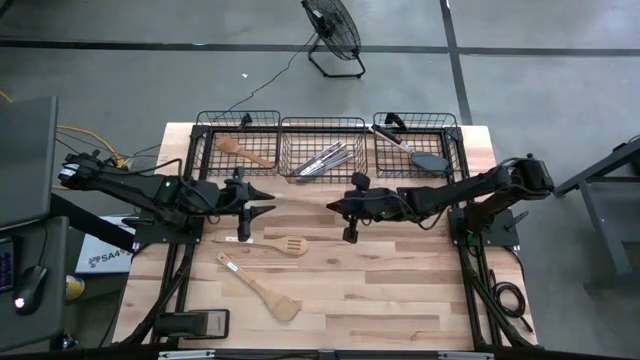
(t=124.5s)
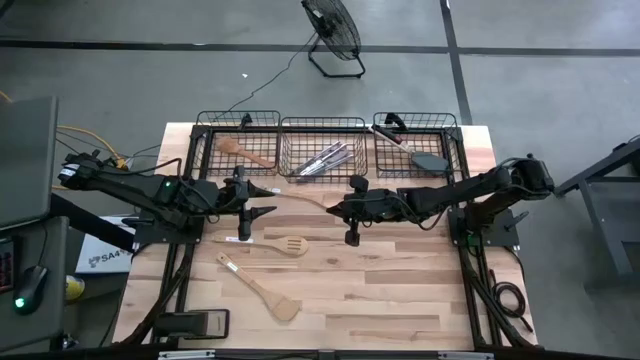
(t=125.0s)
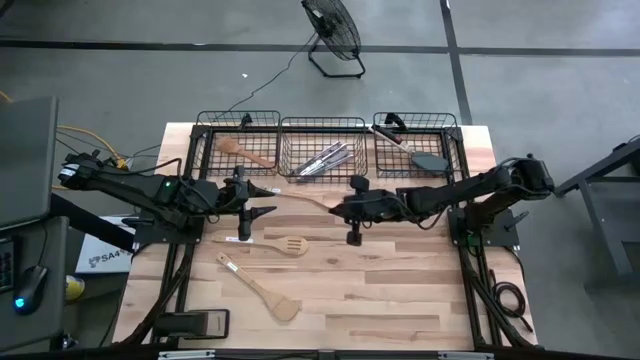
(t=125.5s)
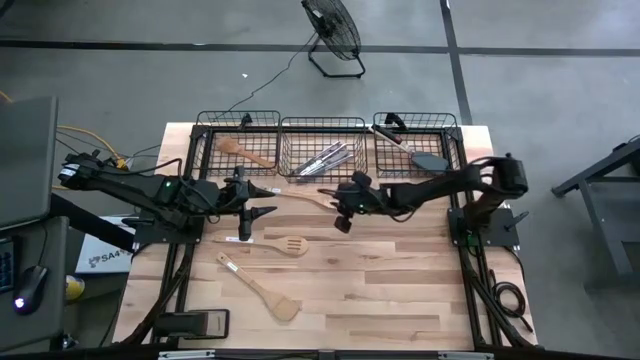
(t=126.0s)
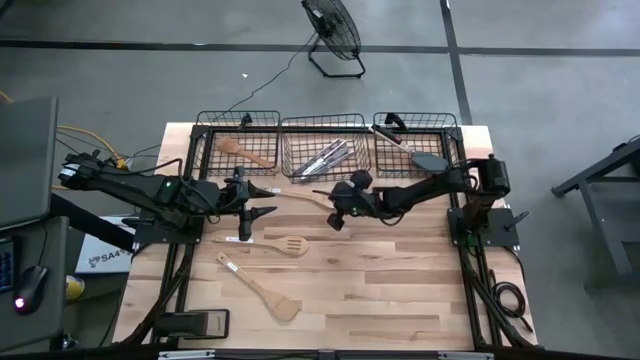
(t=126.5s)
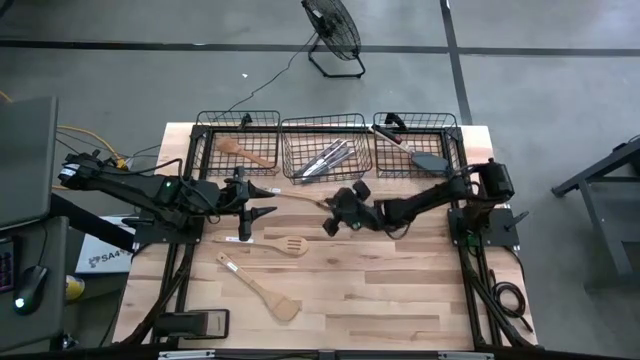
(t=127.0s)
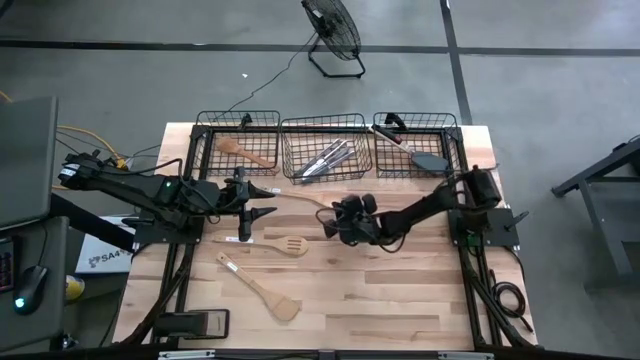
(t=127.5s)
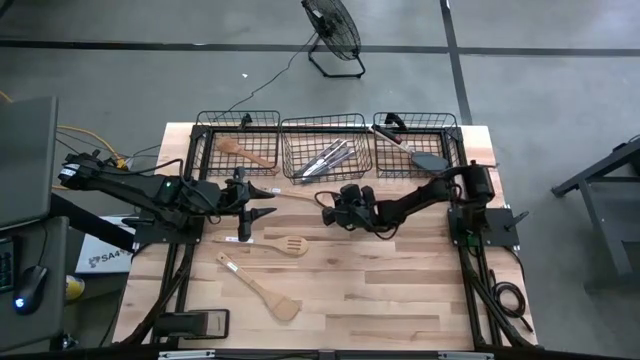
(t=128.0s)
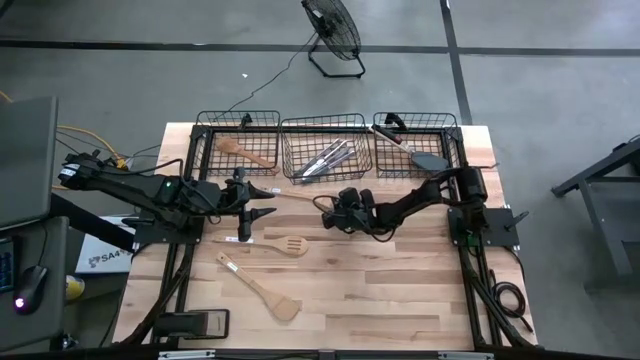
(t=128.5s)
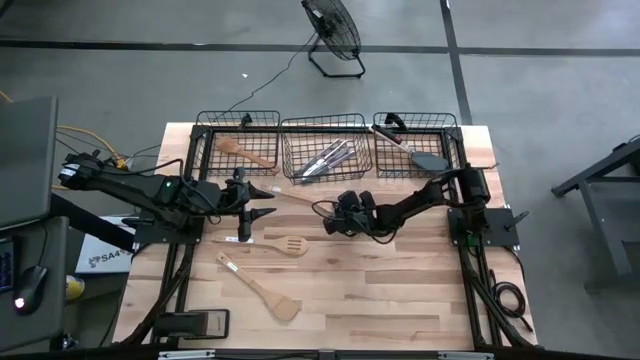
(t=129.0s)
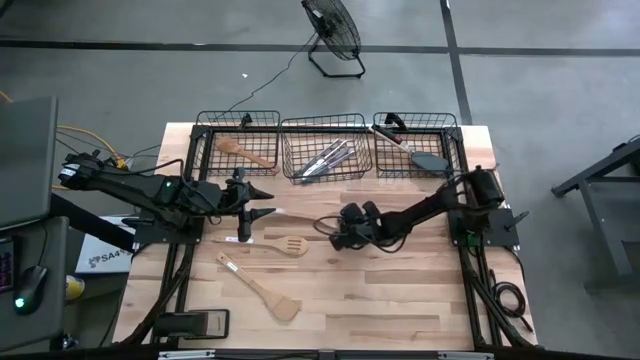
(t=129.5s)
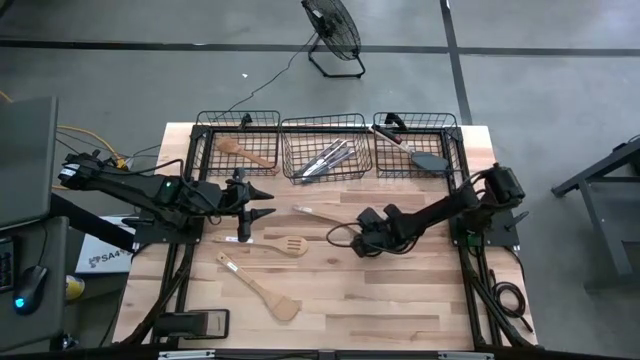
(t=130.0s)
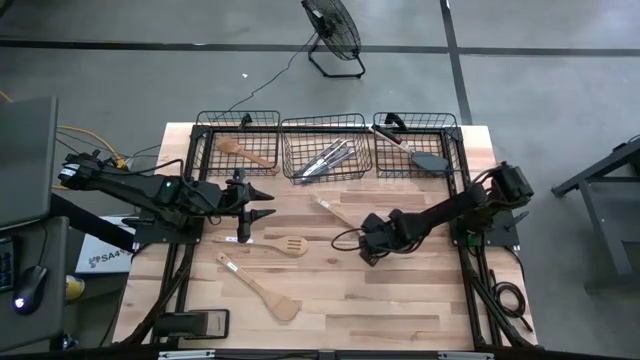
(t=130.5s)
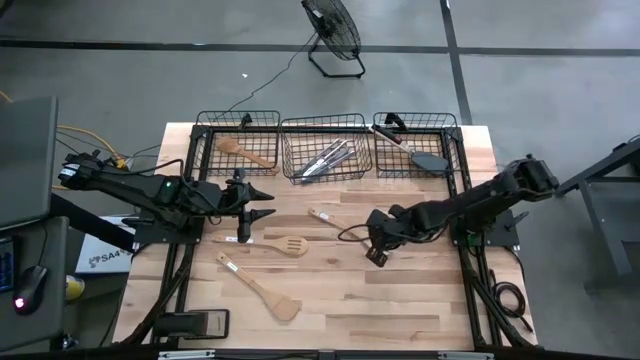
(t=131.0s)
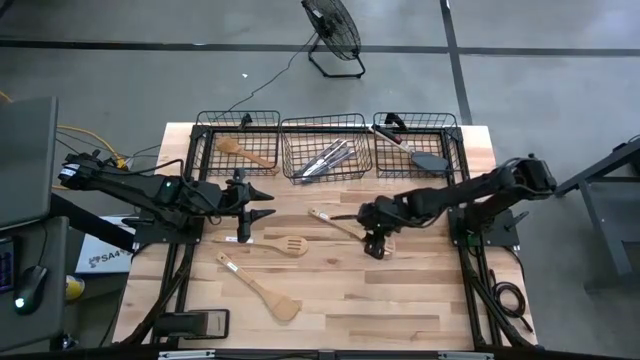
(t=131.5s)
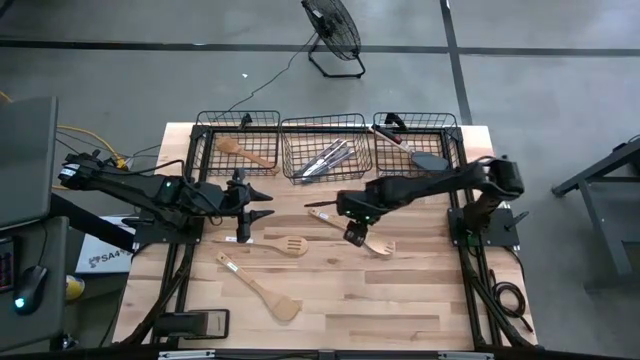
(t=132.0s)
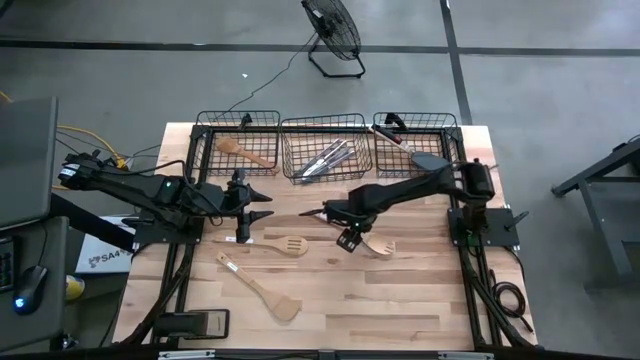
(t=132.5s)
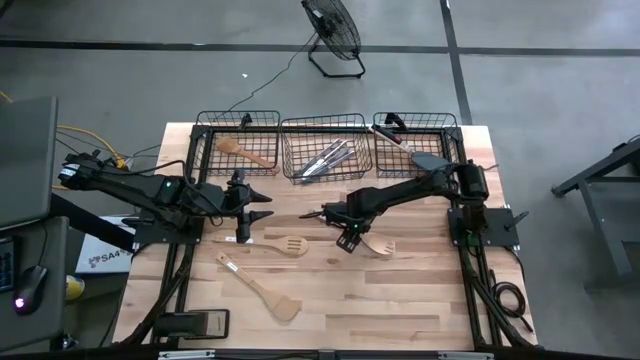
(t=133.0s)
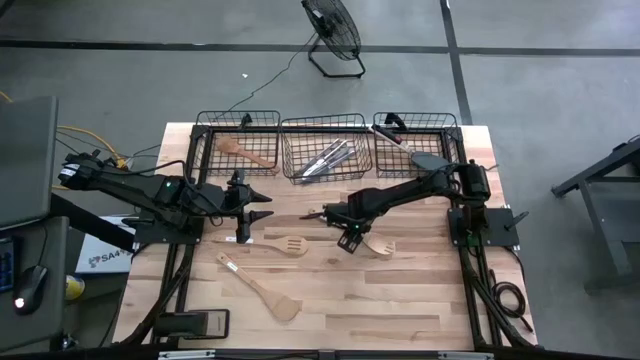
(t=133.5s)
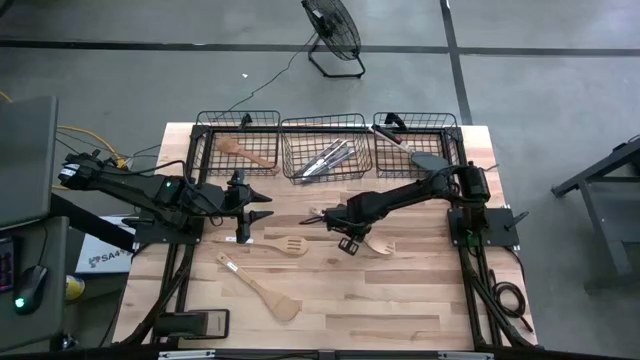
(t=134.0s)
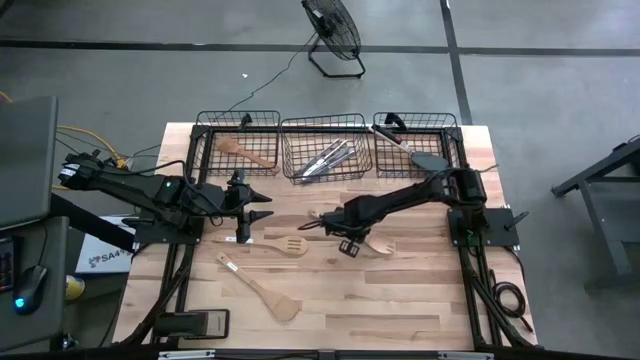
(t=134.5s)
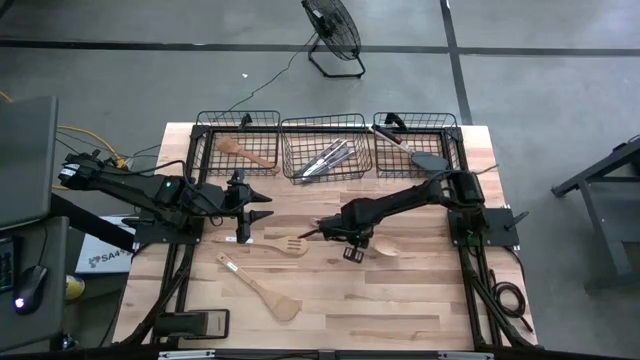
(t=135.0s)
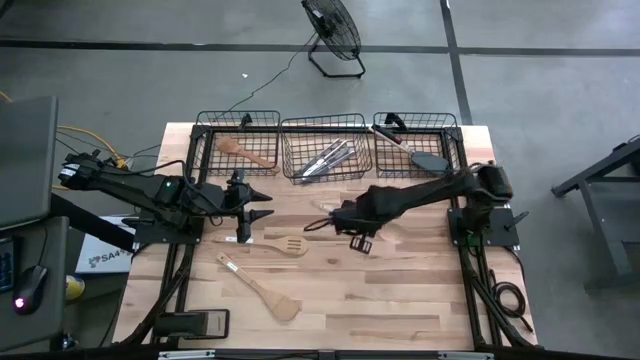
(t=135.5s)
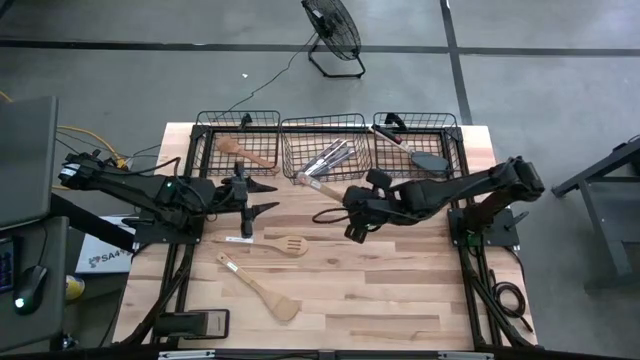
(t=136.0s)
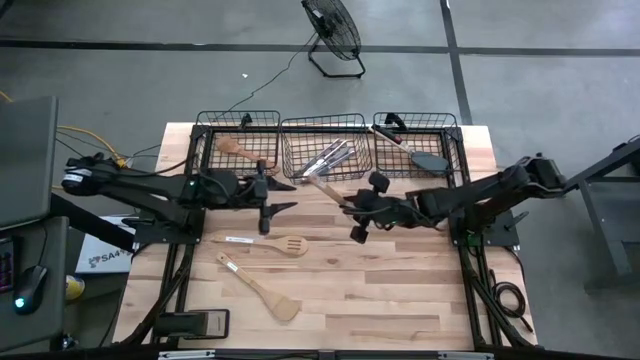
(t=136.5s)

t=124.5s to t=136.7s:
Task: Pick & Place Kitchen Items
Put the brown serving spoon into the left mesh basket

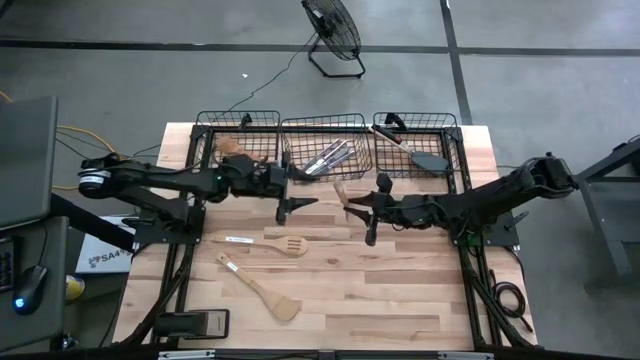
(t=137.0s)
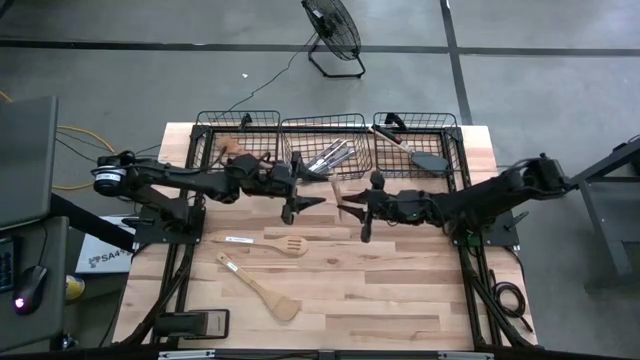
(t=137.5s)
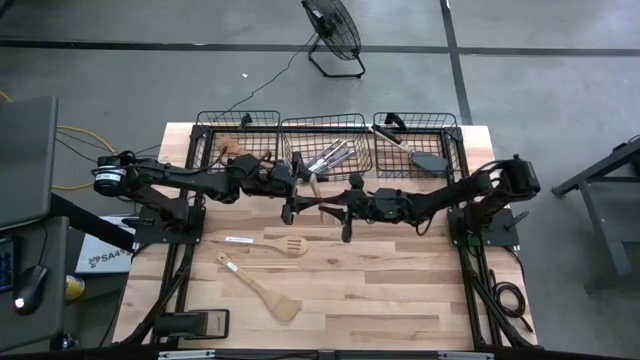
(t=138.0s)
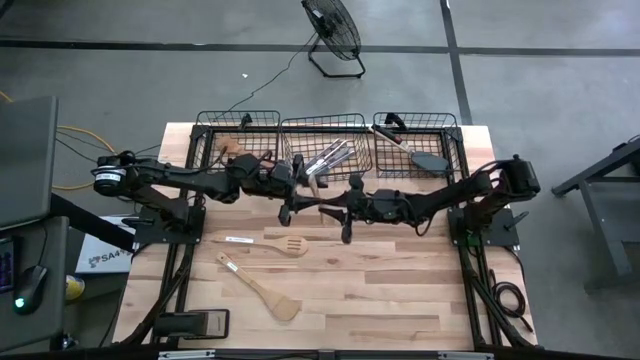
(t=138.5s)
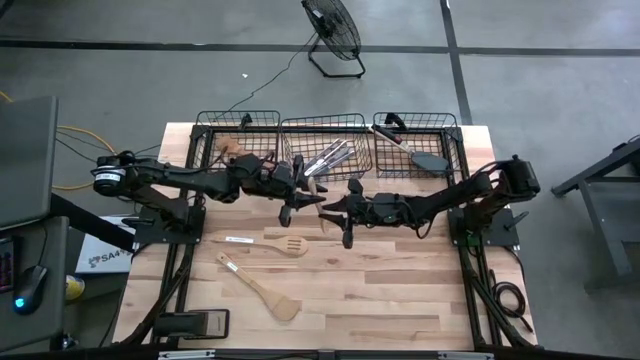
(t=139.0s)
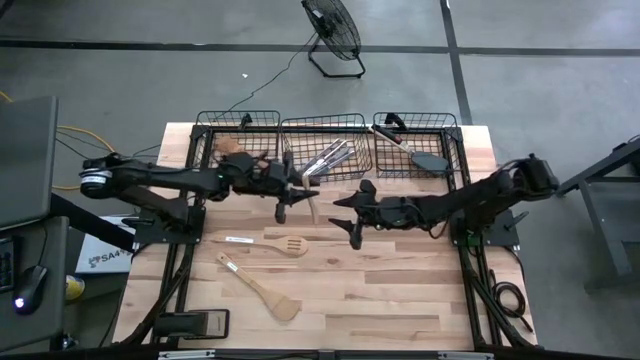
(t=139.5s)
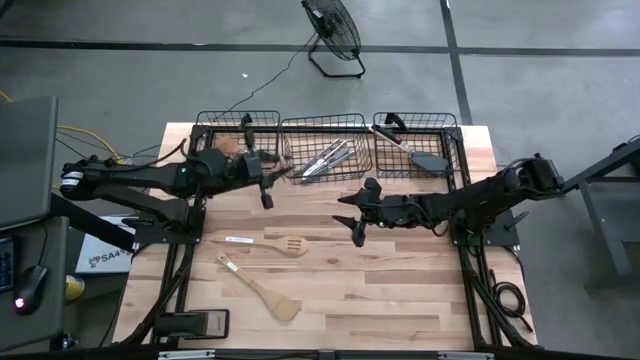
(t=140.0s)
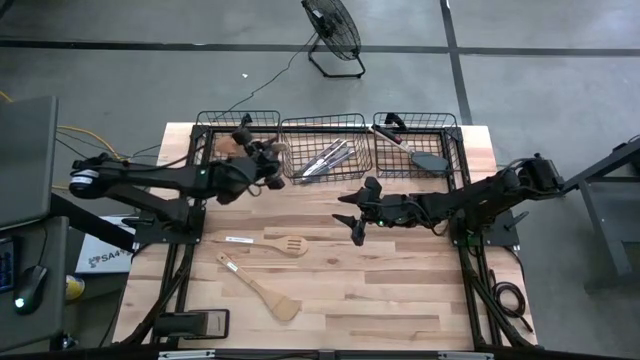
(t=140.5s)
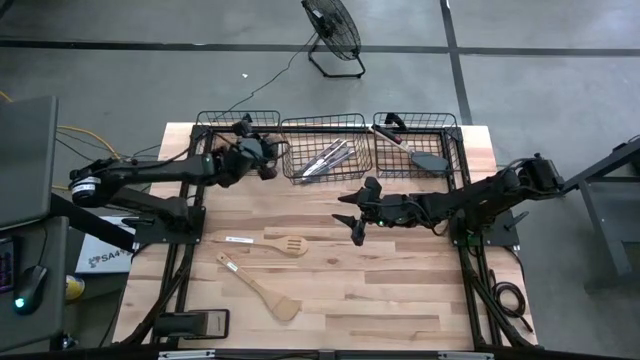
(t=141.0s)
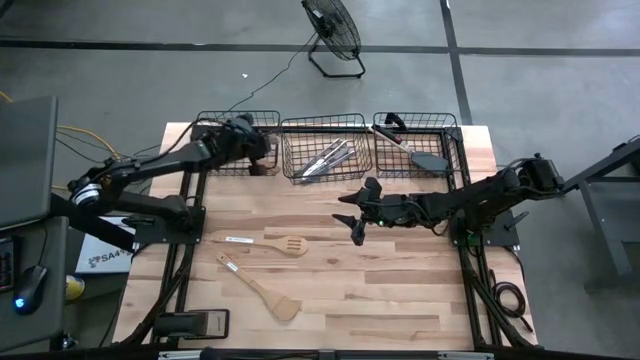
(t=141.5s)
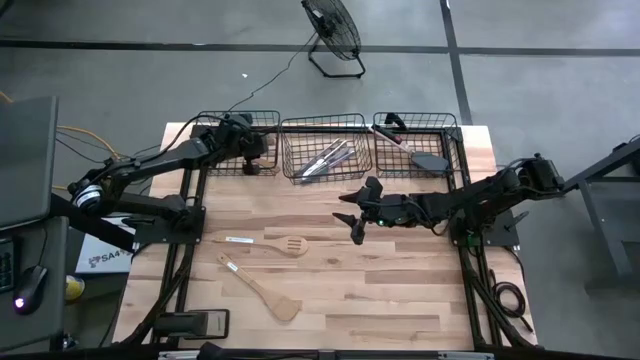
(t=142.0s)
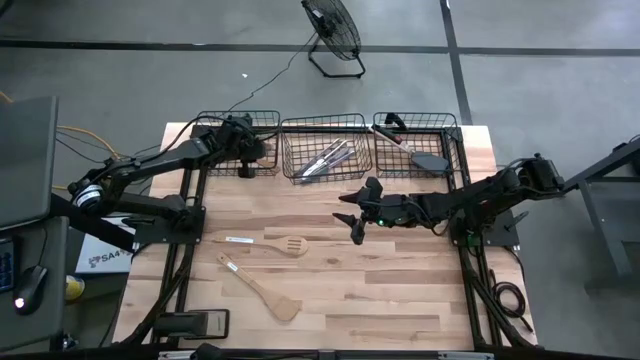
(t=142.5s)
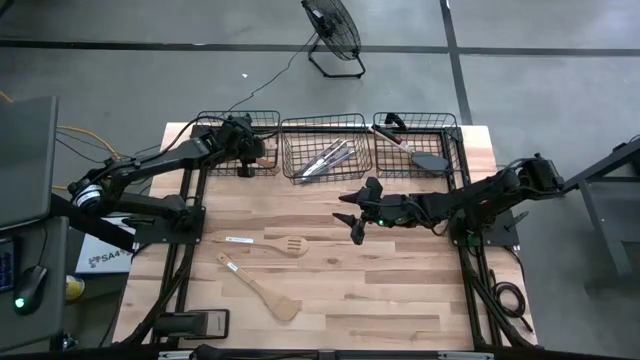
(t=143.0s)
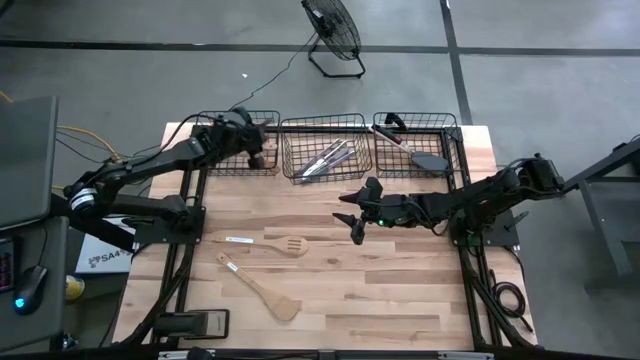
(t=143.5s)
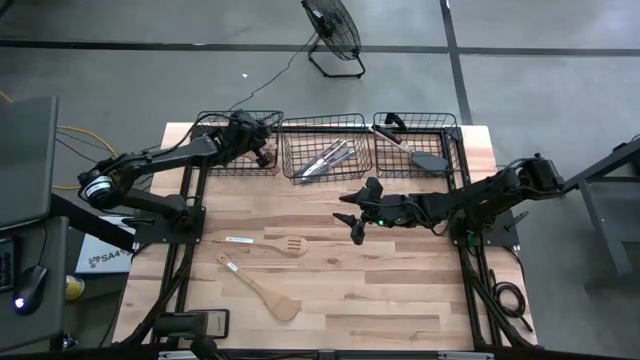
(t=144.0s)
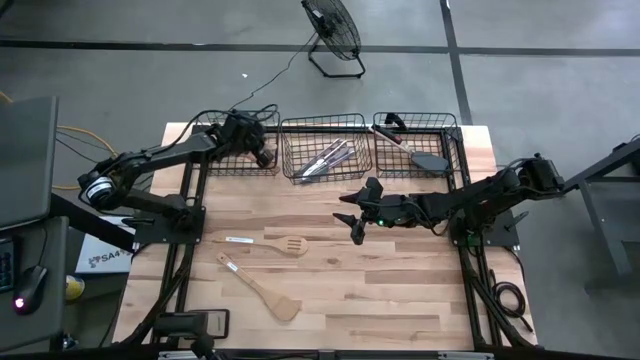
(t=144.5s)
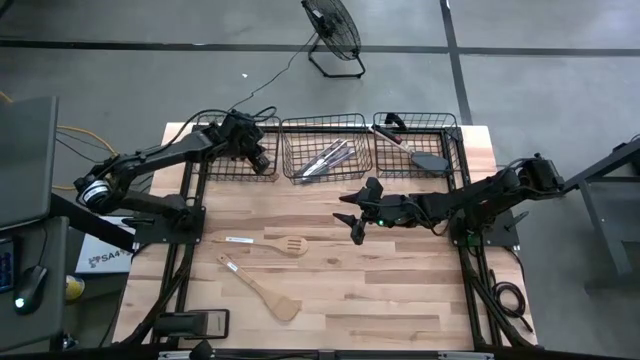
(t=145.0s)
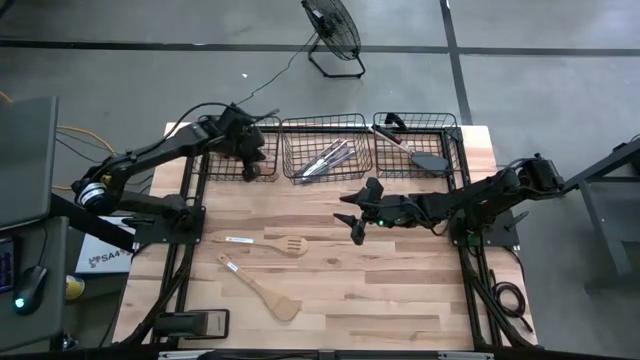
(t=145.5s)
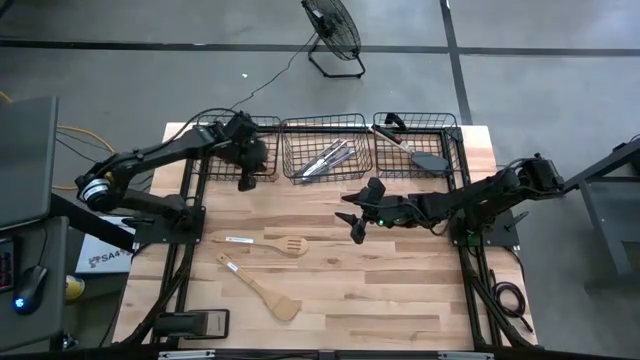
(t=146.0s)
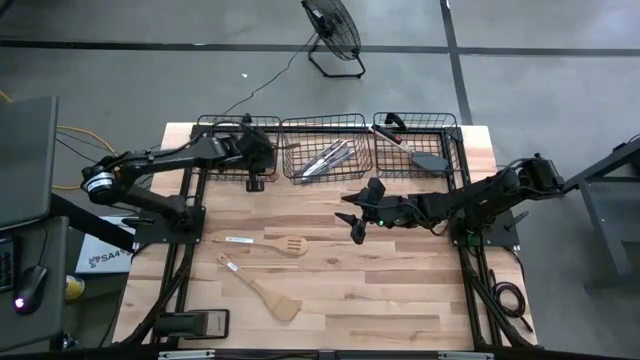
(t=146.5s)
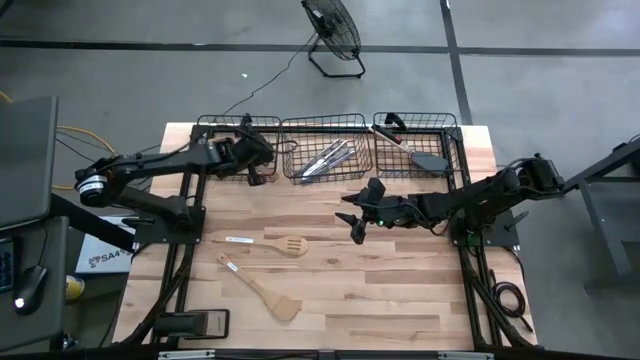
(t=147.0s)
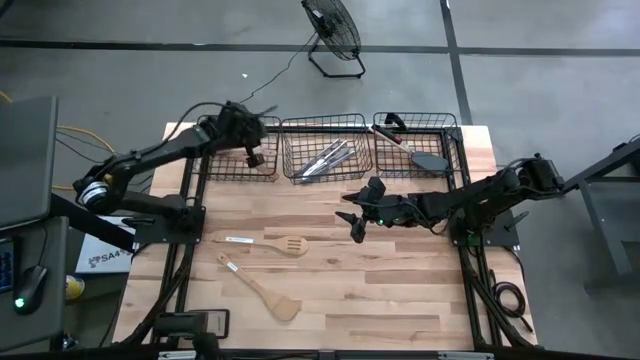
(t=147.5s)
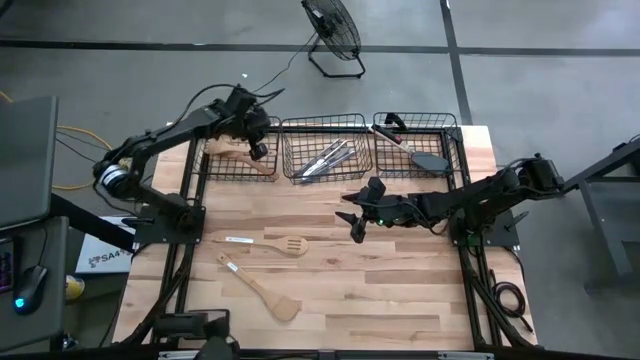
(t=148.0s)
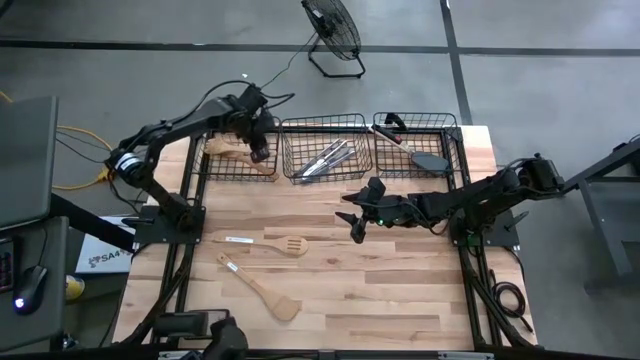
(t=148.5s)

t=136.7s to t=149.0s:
Put the brown serving spoon into the left mesh basket
